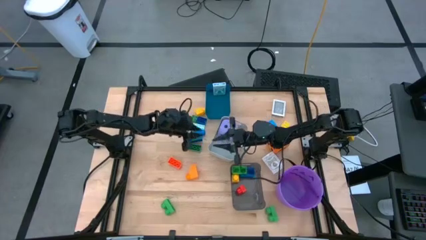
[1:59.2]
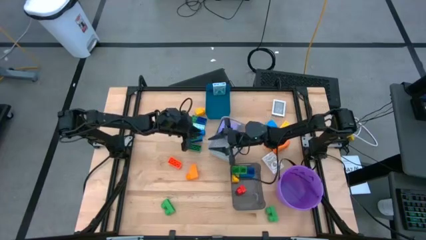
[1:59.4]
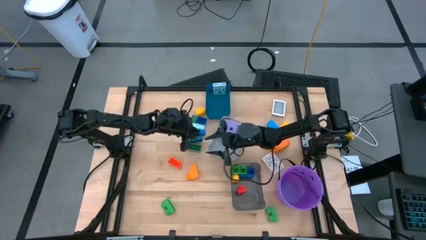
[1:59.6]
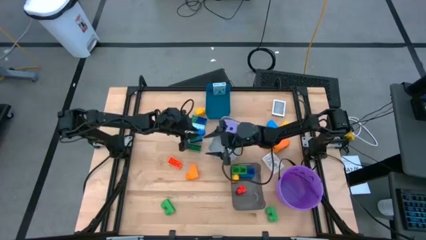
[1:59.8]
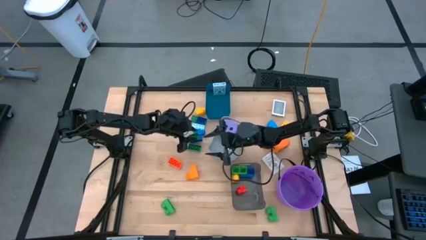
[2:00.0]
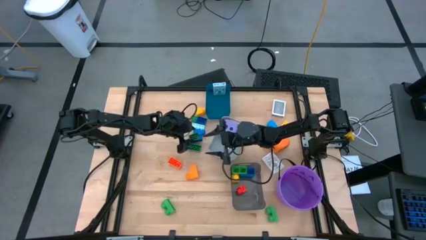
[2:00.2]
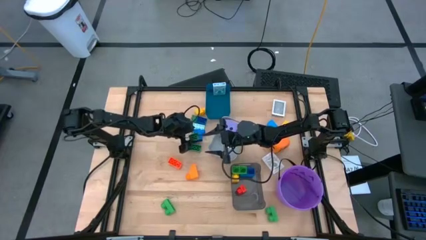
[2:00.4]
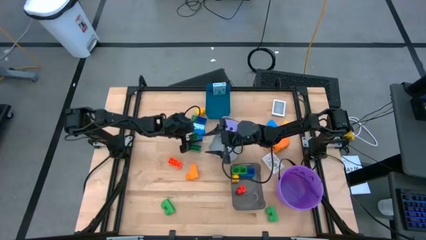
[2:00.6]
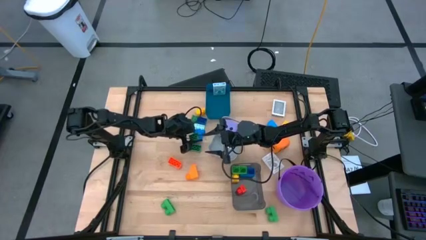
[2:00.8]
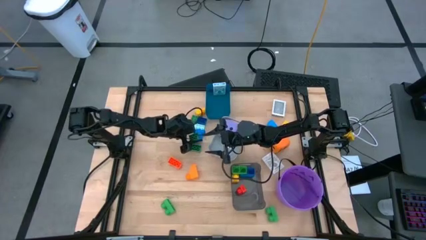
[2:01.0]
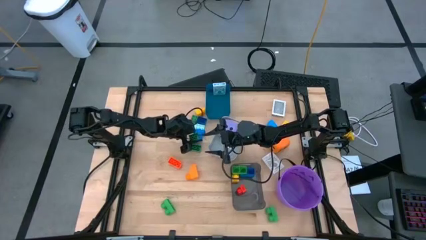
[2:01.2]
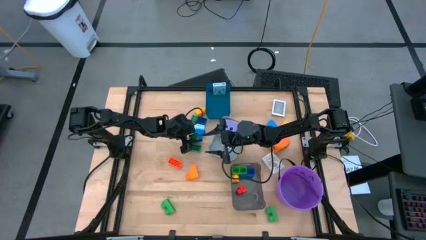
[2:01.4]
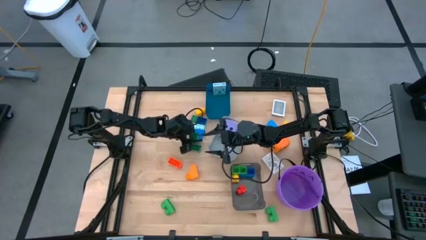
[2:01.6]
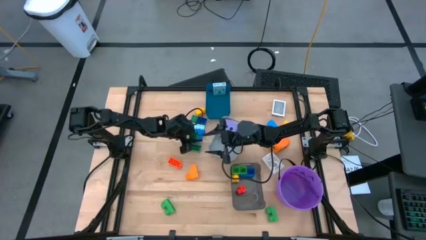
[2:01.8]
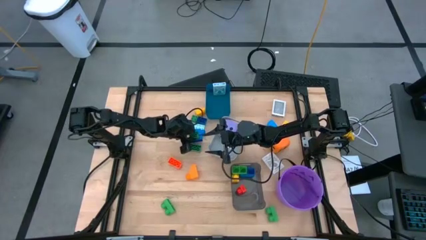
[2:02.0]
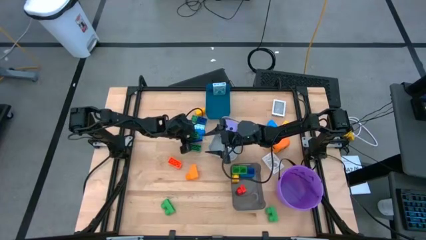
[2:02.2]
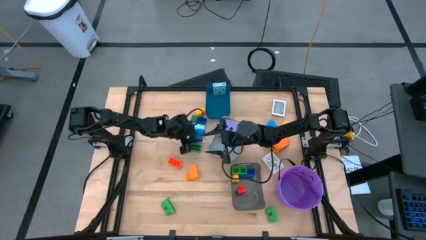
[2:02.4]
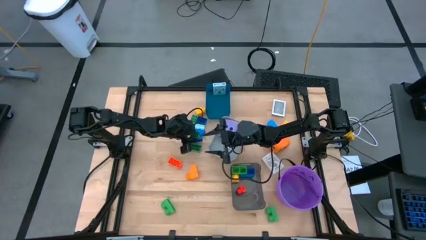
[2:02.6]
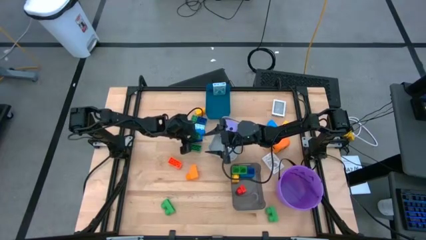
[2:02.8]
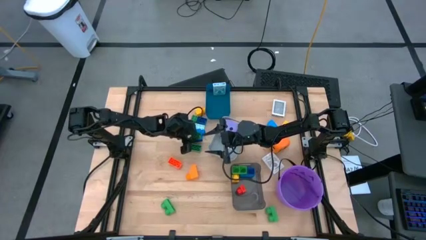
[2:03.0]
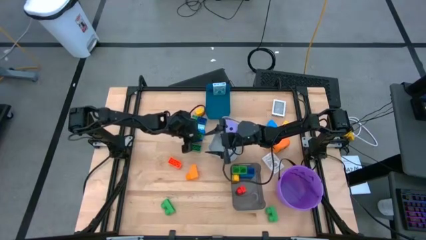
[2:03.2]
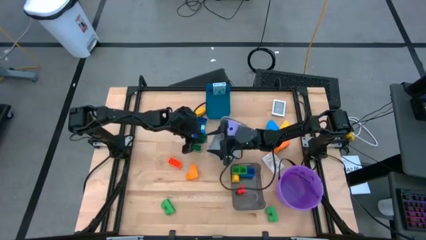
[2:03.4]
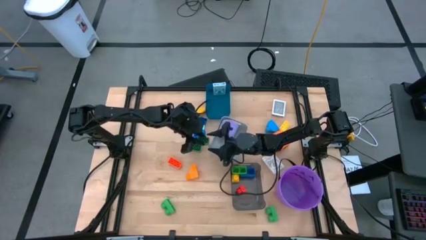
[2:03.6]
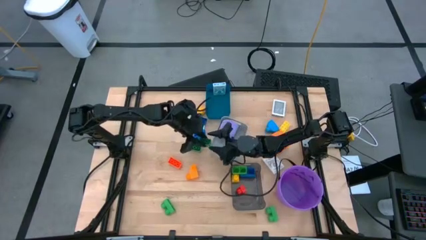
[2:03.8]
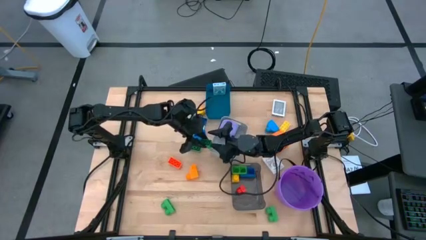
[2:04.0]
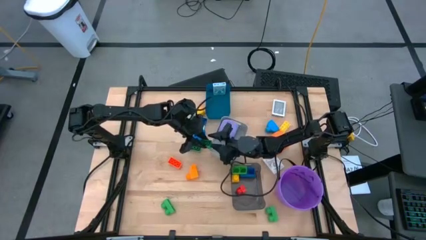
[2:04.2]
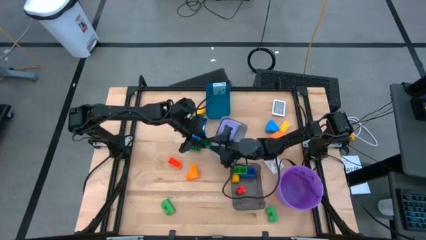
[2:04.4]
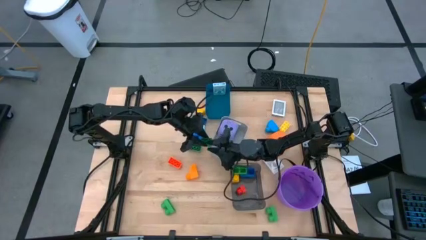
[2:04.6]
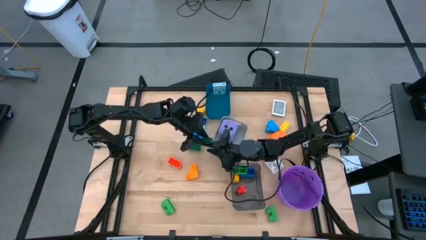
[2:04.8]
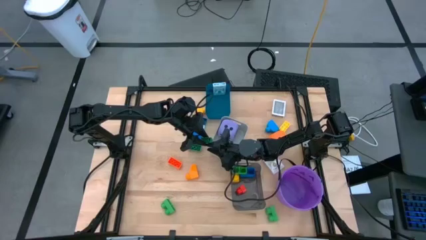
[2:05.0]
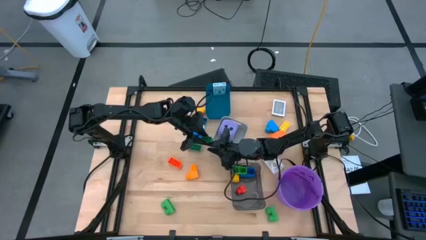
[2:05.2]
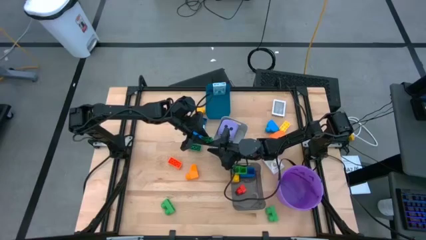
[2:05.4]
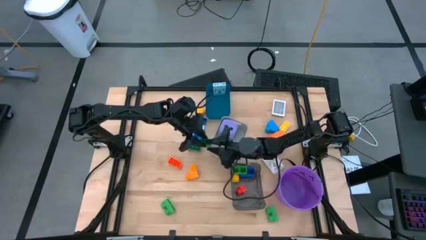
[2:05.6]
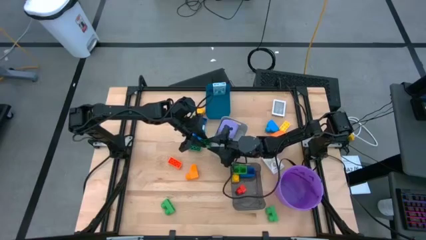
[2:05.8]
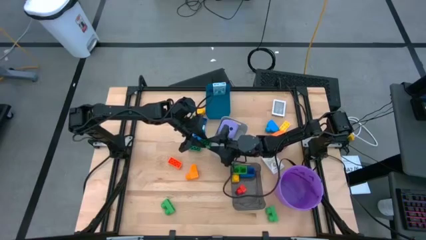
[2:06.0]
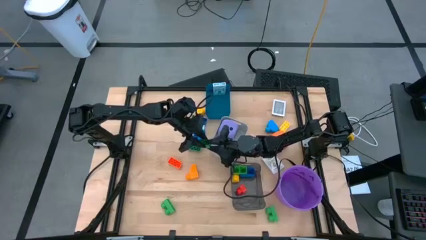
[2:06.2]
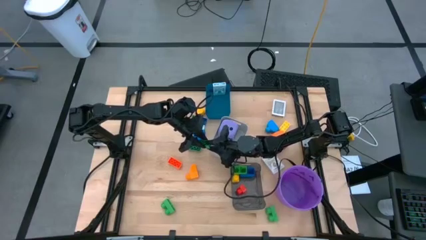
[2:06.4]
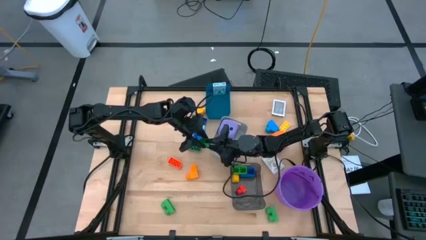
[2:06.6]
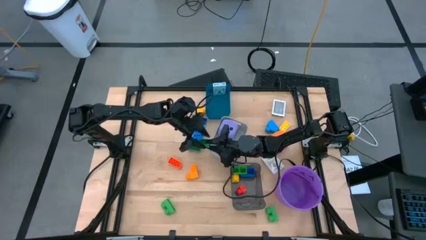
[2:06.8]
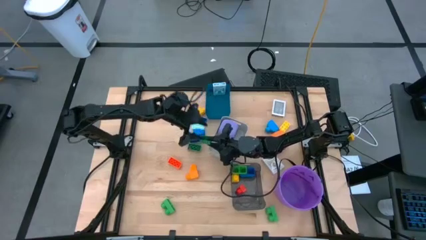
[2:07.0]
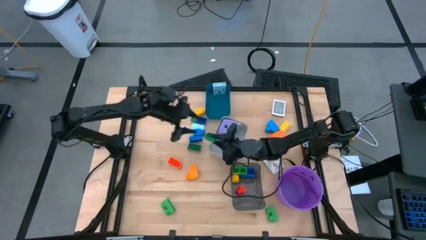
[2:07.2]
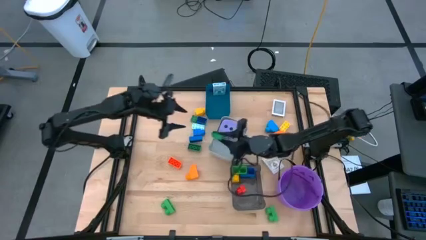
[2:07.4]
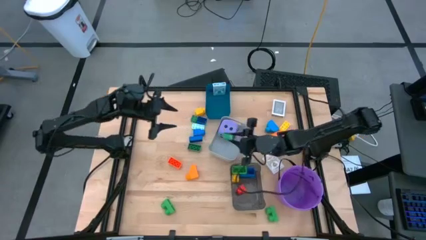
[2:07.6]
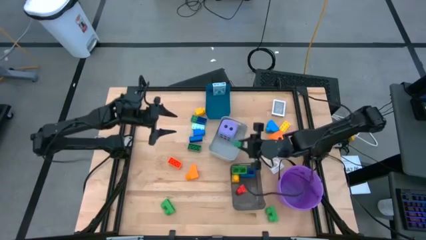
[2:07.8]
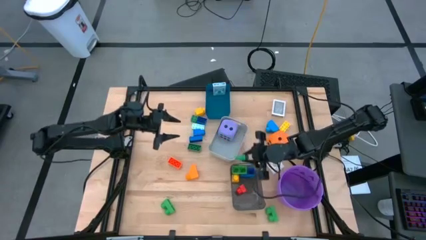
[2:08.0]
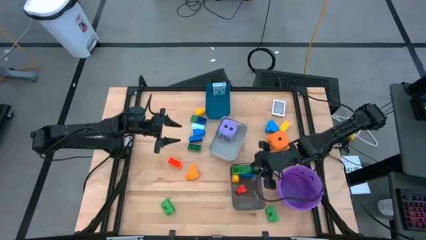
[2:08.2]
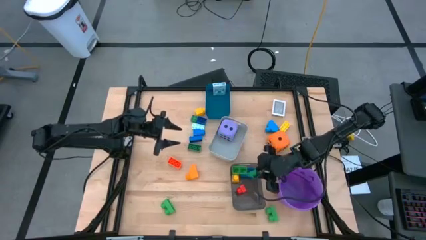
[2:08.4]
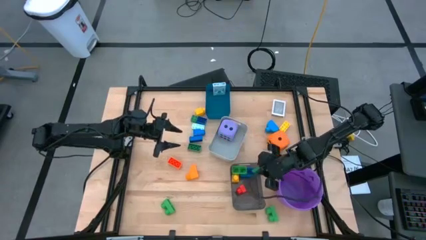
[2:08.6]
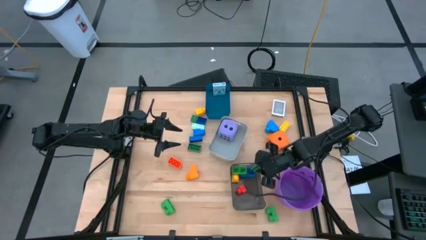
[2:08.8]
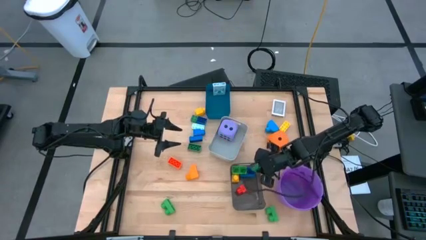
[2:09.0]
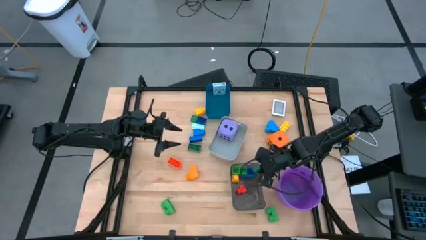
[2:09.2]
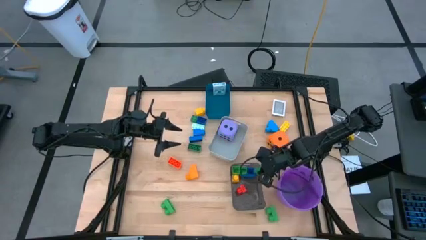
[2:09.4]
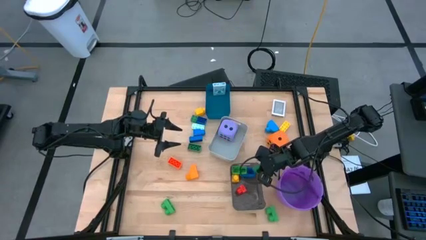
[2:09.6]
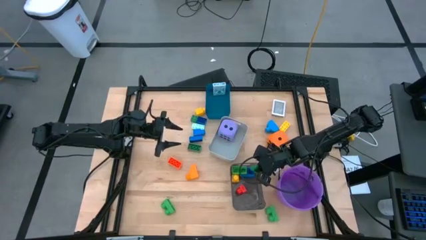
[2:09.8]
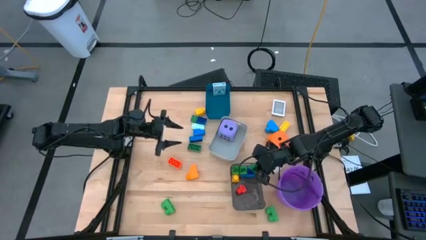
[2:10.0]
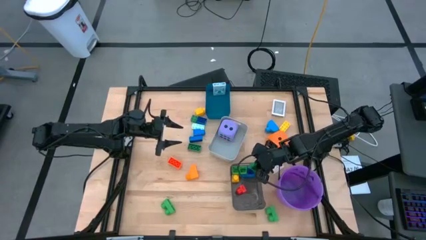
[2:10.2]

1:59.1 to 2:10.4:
Task: Pick & Place Toys
Put the dark green game piece into the black bin

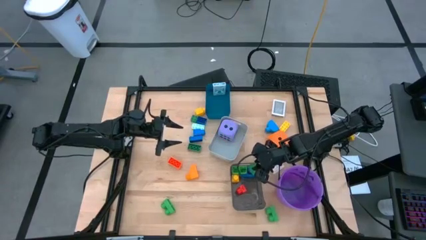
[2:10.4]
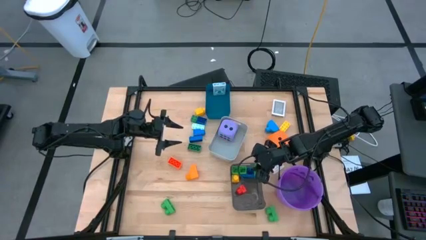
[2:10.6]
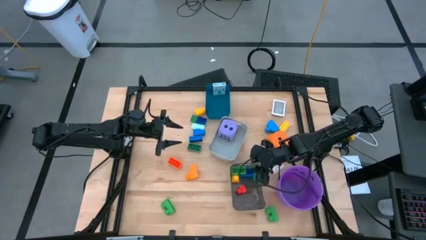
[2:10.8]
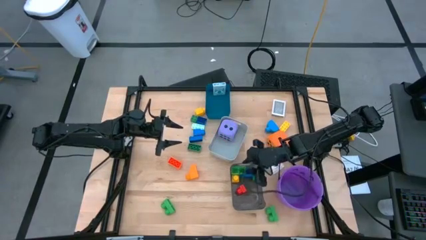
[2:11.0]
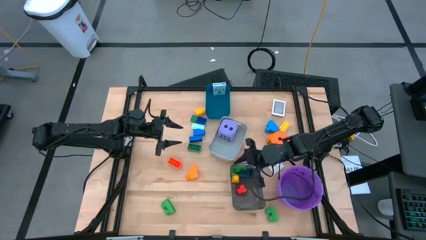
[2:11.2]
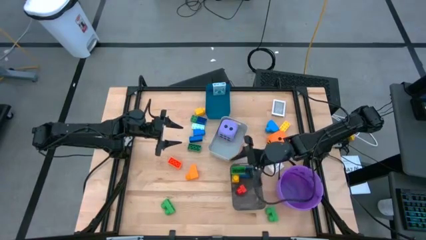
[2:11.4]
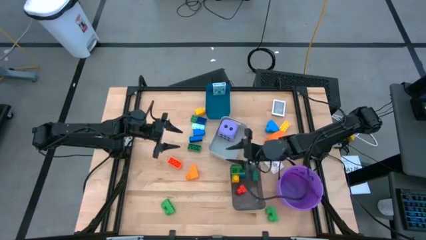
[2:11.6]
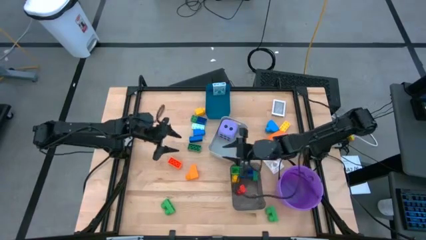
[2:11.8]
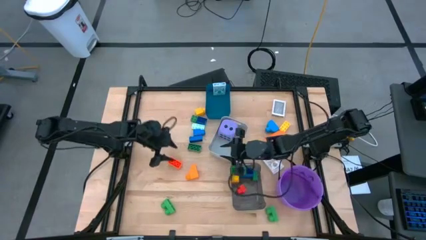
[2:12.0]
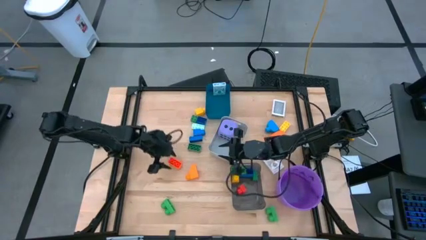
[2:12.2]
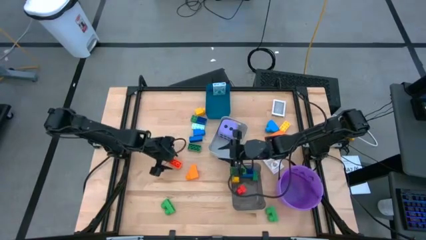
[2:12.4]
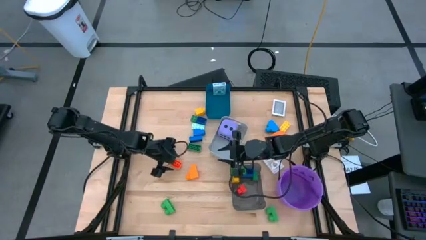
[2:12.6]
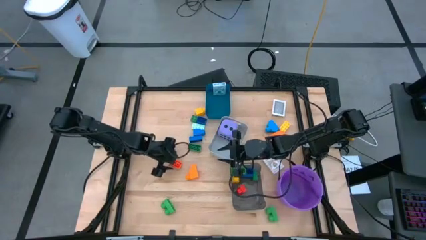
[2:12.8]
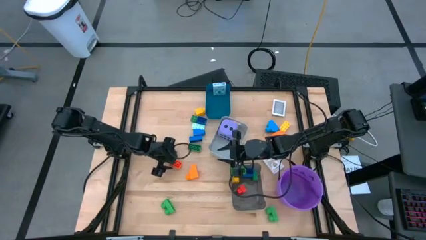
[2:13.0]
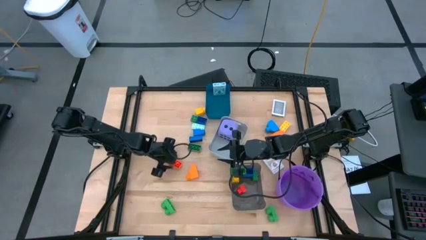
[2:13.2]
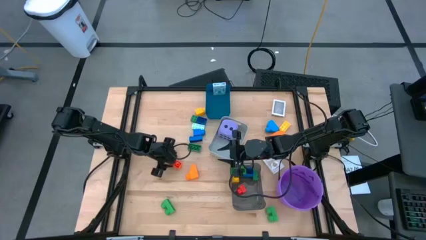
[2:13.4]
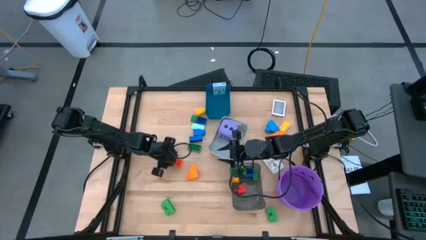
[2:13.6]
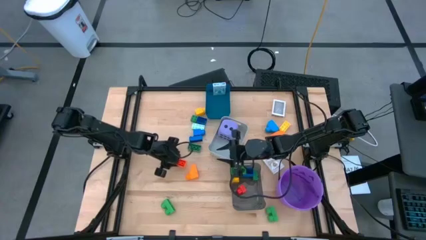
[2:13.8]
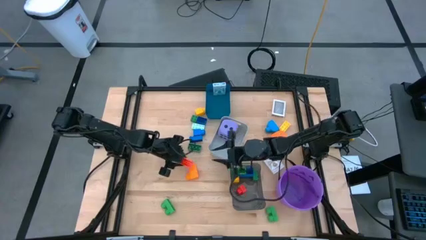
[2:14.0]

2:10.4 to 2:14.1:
Put the orange game piece into the black bin
